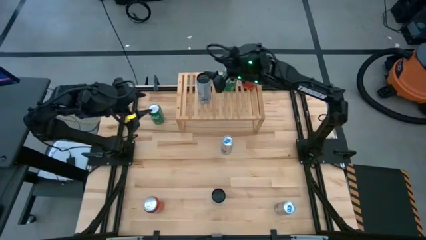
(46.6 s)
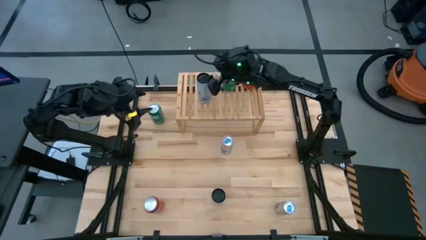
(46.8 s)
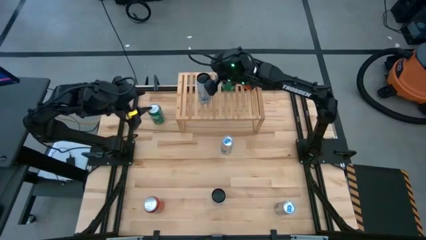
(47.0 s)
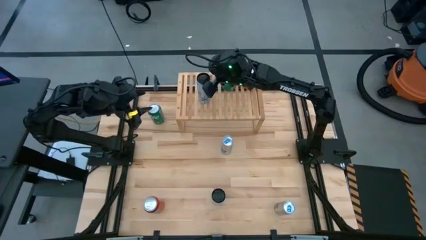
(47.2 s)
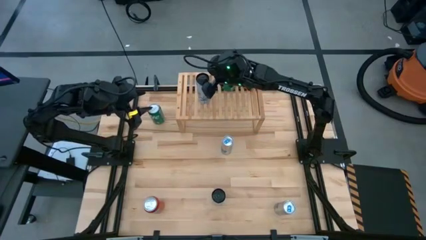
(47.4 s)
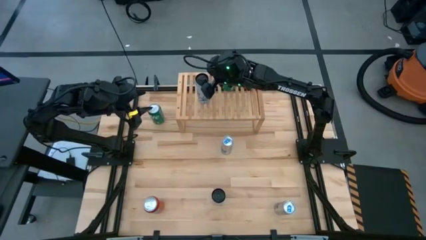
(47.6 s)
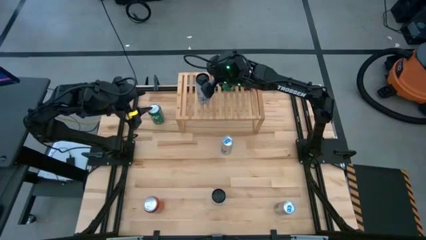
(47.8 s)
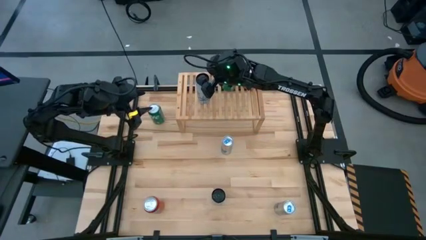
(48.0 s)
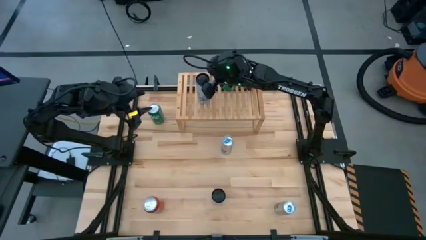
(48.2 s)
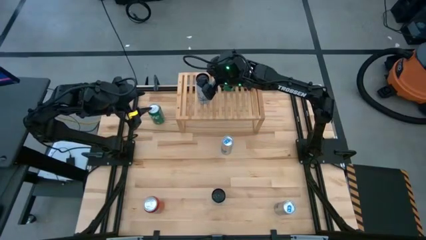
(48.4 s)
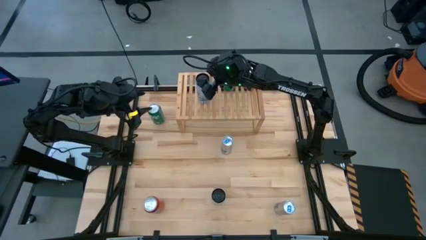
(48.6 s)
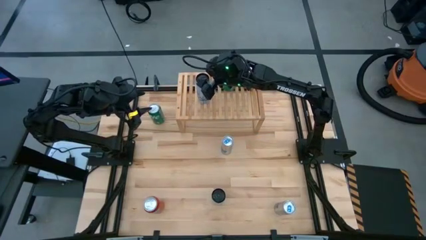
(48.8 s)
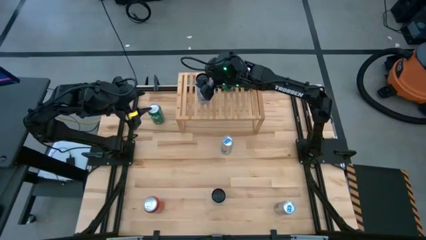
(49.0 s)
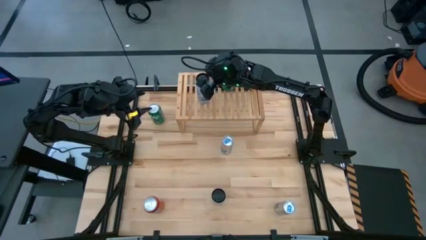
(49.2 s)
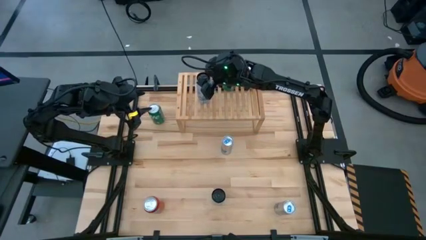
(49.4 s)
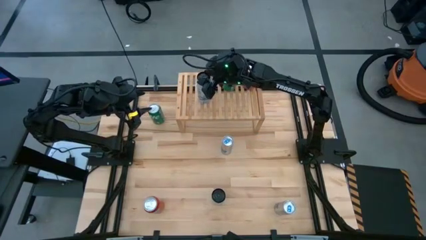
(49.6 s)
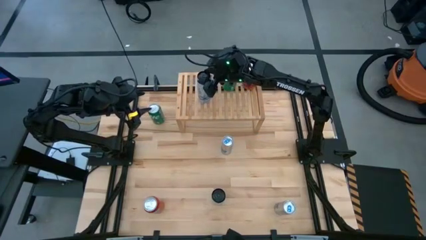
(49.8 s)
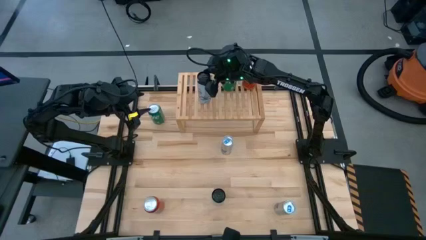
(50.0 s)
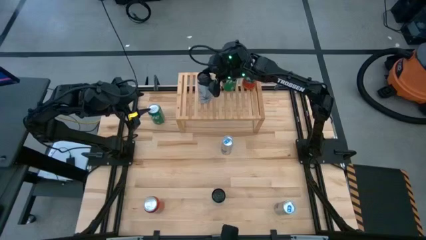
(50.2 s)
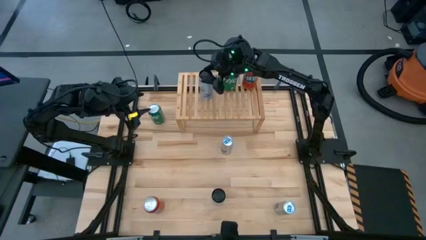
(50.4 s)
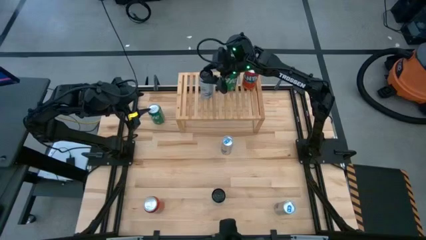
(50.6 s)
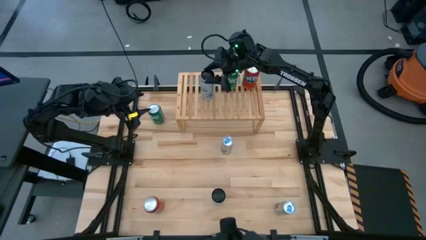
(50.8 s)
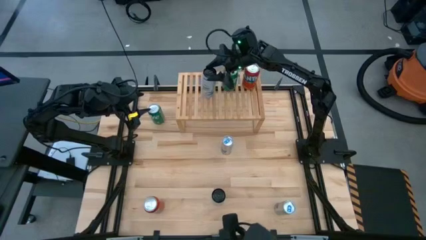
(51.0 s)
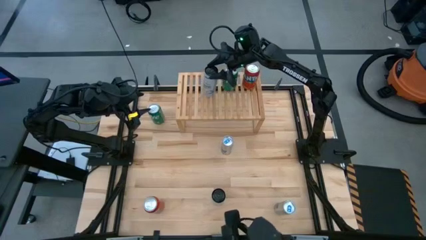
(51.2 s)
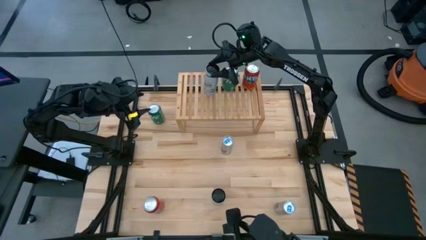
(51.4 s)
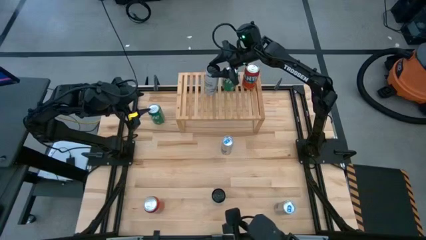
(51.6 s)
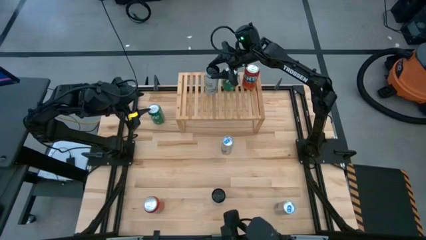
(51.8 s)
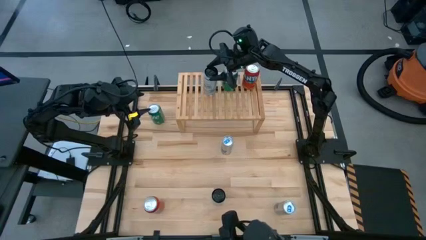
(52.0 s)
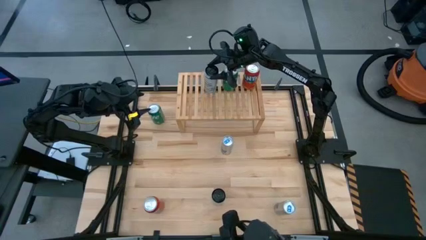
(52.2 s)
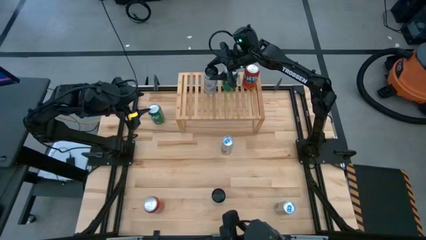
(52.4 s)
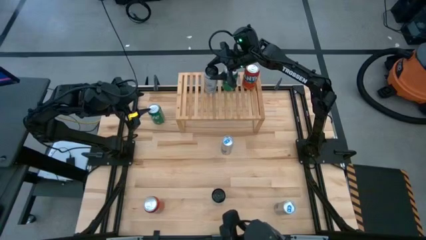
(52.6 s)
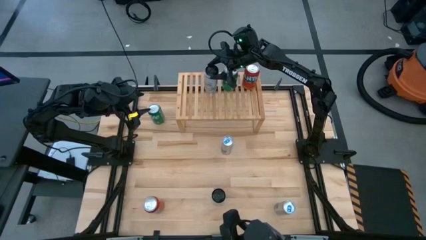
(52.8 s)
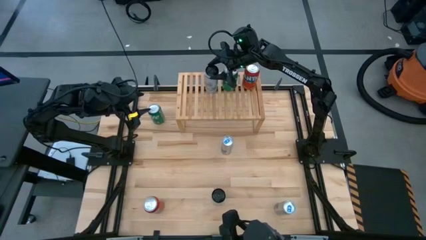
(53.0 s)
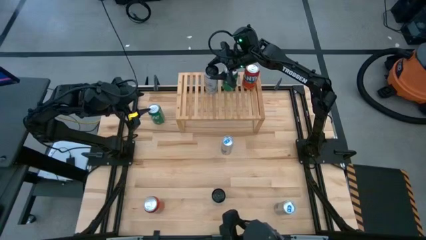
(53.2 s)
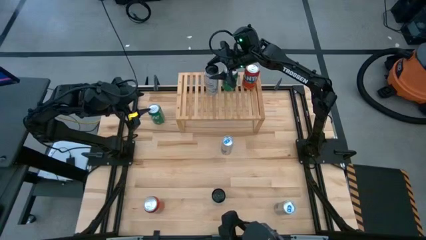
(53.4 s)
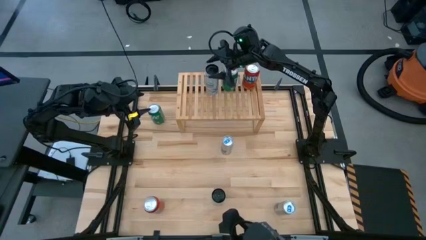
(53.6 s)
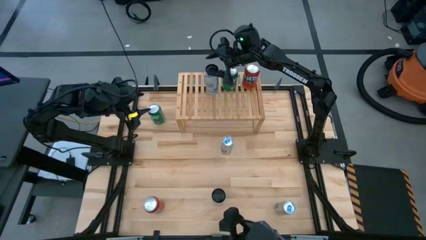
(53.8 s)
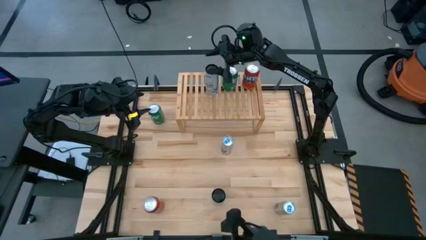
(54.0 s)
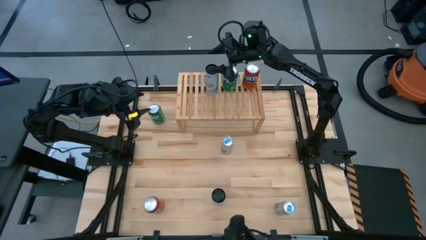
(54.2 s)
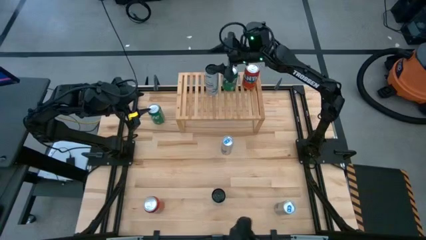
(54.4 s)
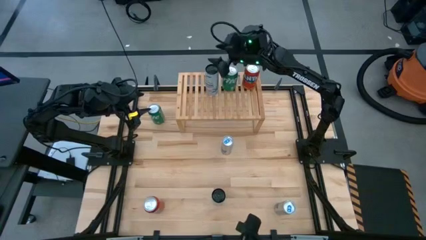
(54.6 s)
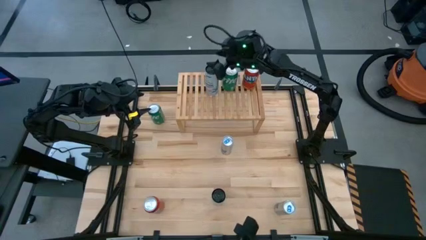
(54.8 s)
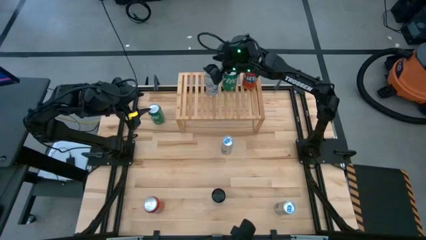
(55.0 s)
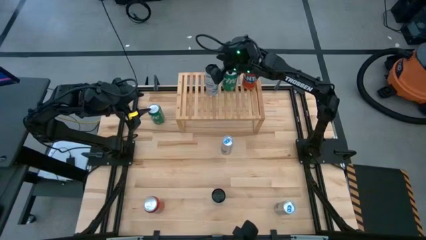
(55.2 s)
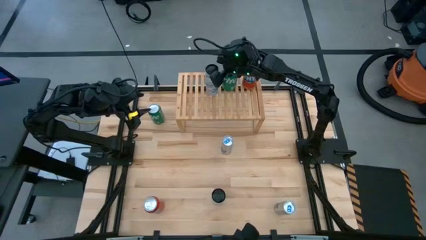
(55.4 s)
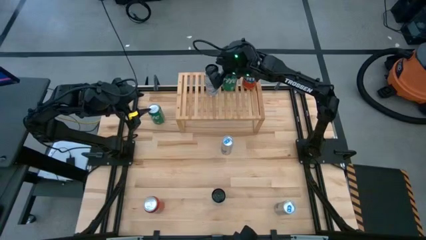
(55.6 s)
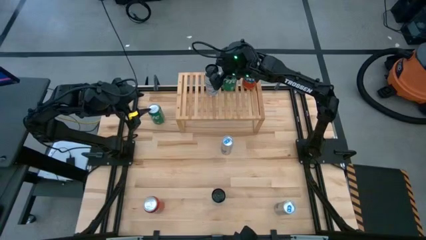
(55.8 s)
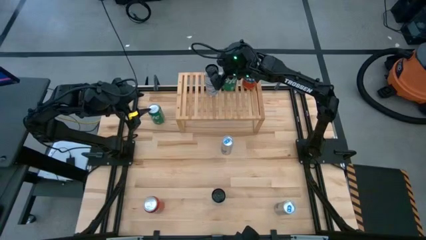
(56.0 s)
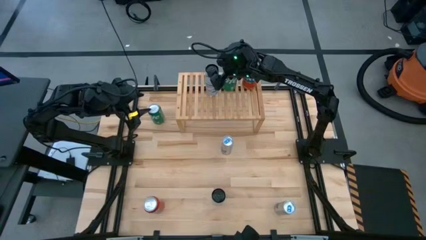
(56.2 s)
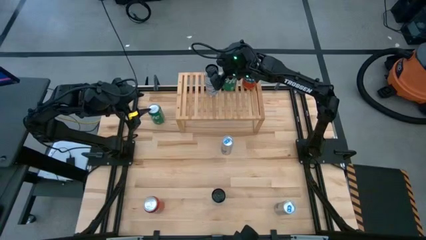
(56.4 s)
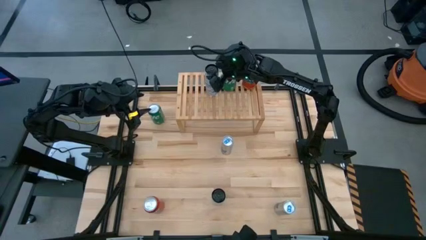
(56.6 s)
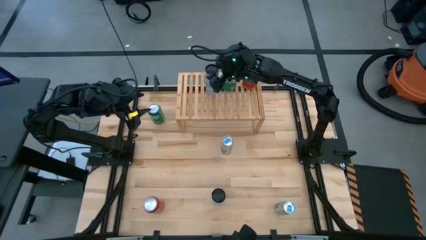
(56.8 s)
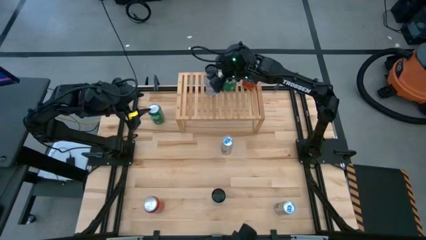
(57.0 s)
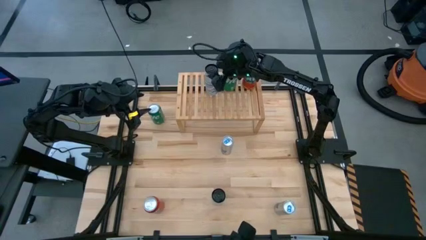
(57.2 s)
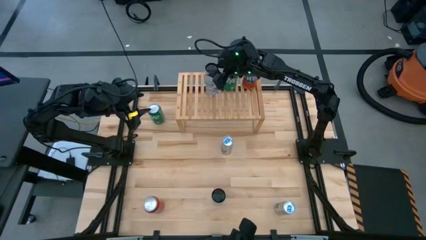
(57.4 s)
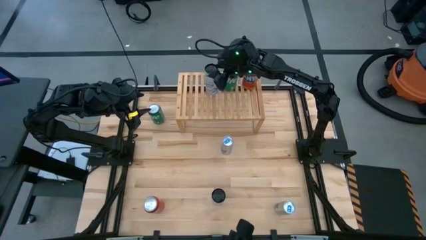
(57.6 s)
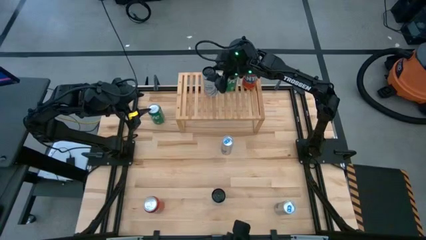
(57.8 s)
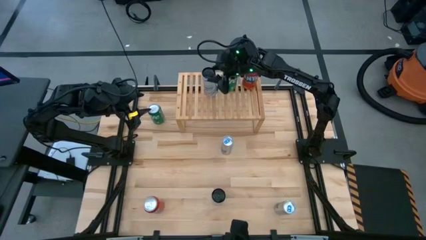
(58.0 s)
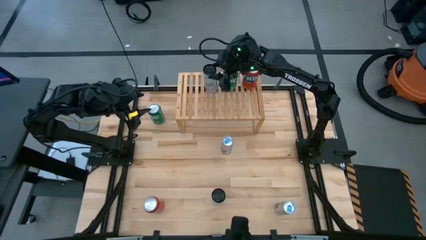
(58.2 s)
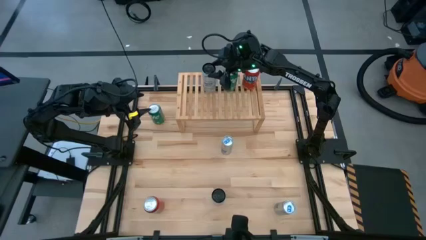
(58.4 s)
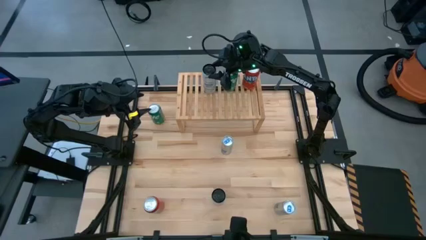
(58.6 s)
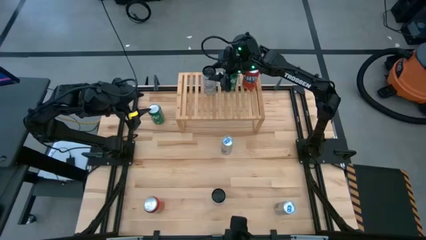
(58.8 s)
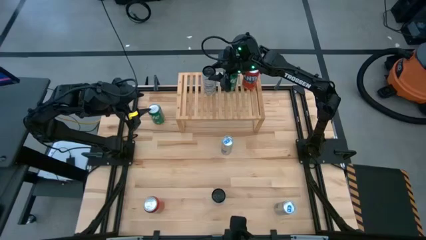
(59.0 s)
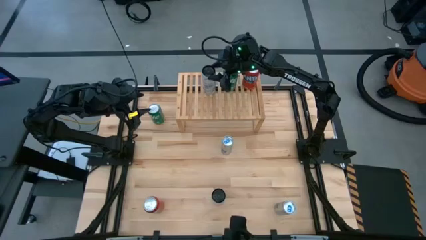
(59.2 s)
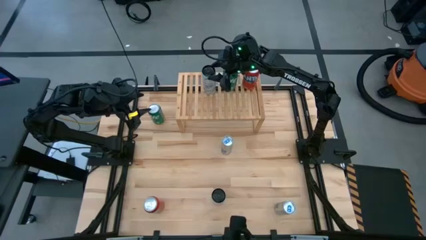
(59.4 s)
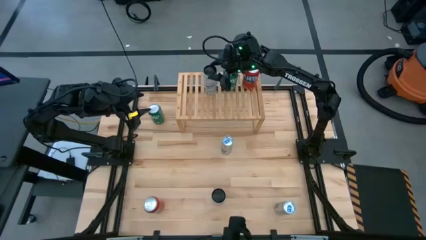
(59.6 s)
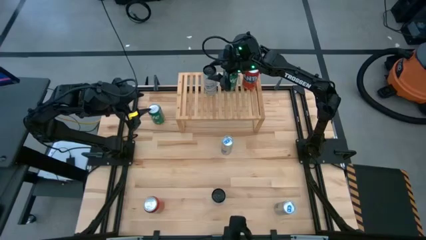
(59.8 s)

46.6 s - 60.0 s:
Task: Place canned beverage on shelf
Put the left white blue soda can on the shelf
